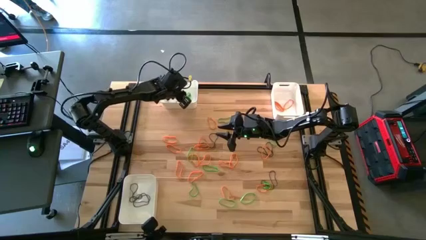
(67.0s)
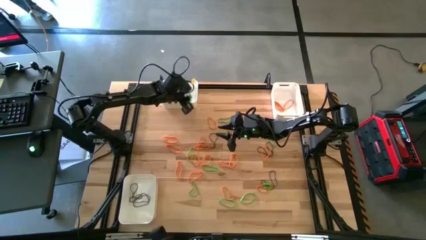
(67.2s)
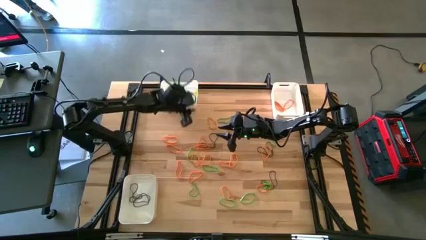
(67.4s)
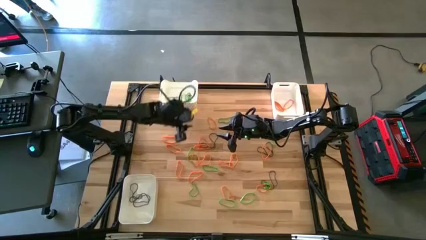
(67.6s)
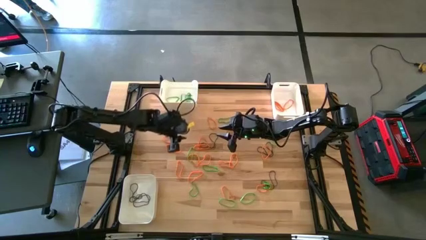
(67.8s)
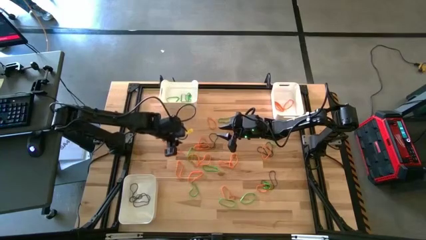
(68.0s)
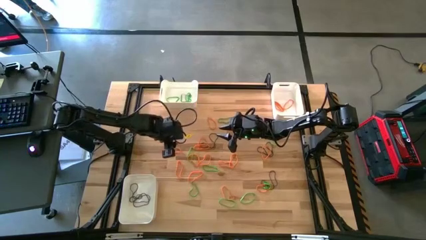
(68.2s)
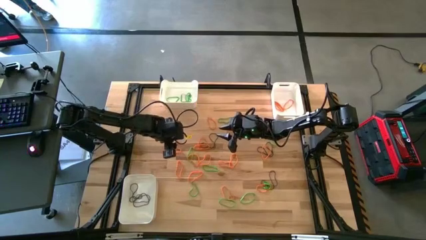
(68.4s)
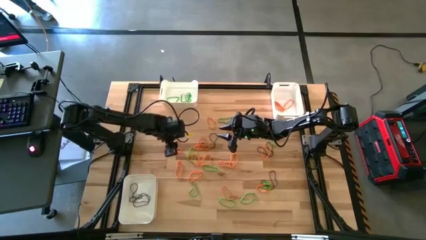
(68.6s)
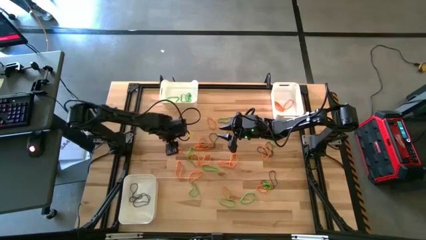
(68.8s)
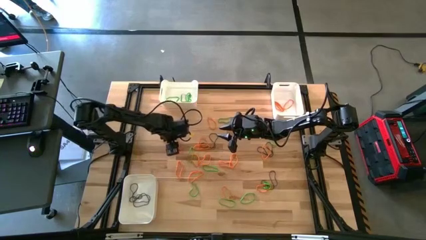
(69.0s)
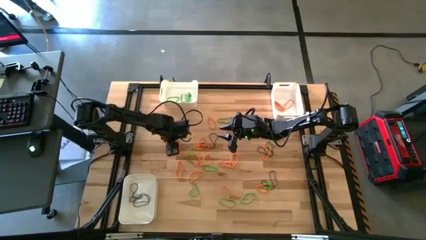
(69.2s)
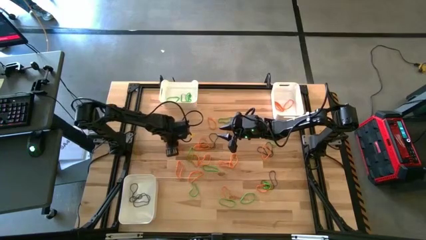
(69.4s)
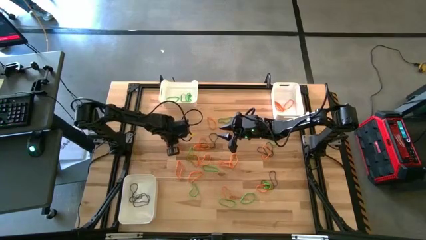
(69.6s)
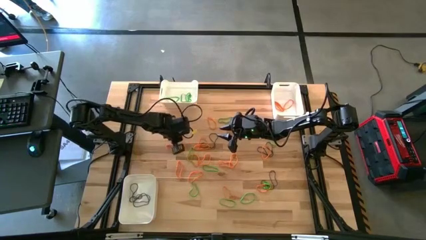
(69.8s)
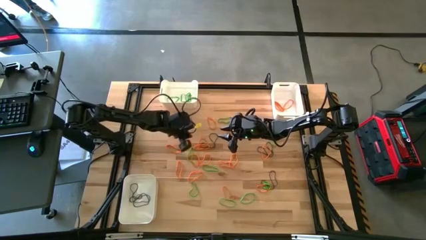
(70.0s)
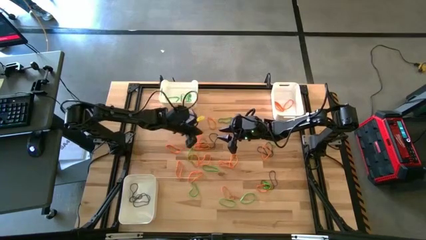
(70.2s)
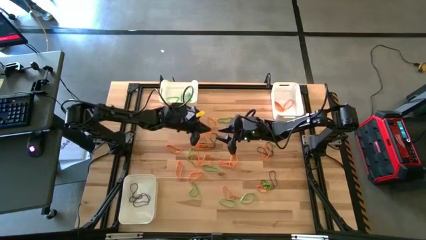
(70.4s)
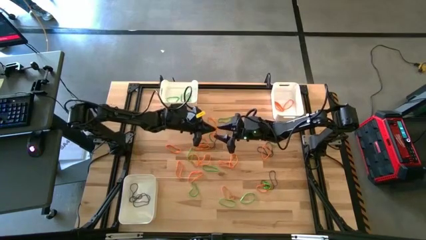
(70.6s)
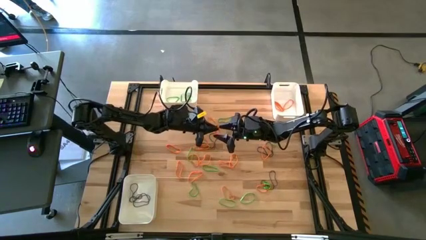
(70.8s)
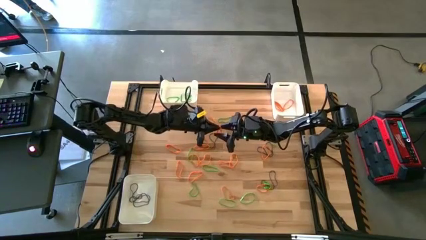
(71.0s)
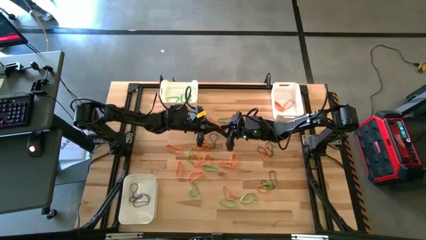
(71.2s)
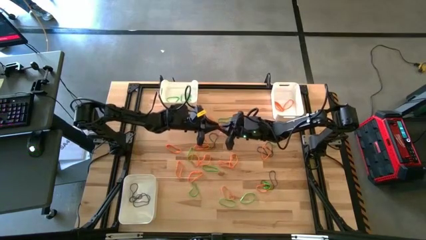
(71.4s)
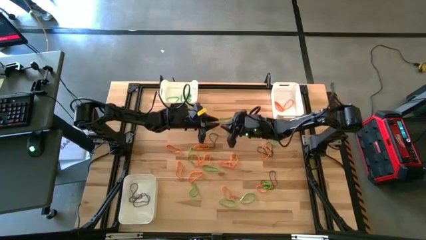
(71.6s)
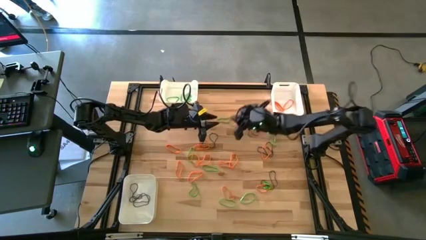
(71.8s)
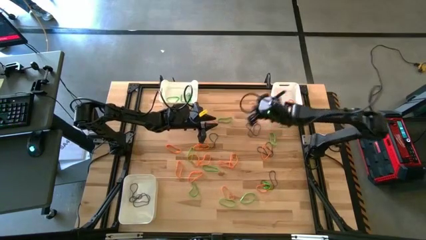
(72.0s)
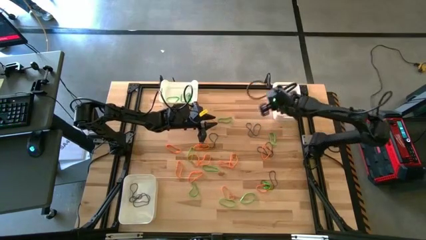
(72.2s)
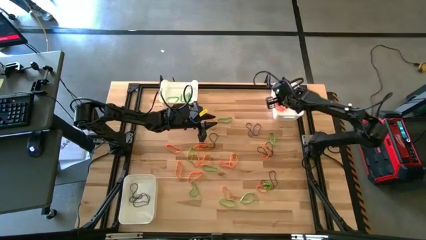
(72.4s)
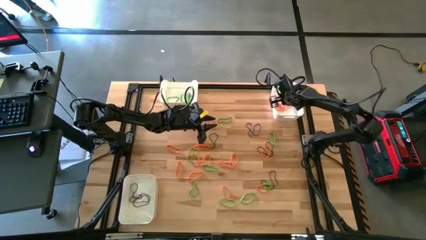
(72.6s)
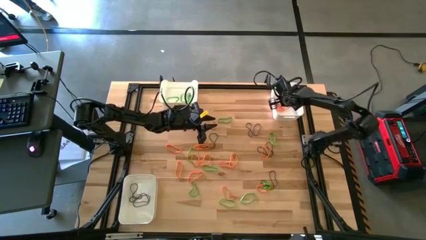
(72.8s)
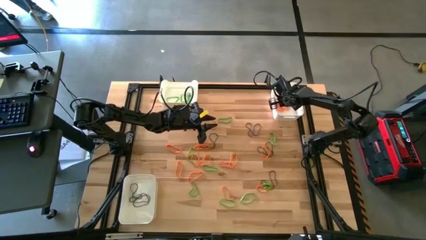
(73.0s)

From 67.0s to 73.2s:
Task: Sort rubber bands into baskets
Put the orange rubber band into the top right white bin

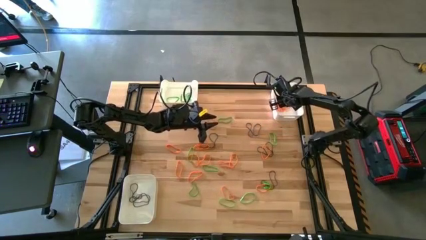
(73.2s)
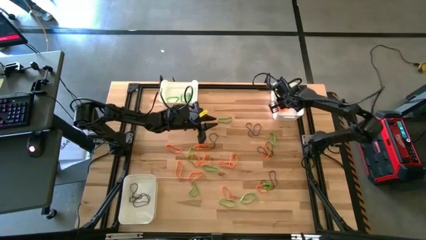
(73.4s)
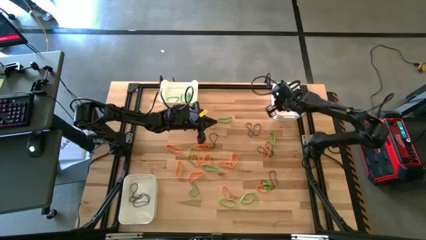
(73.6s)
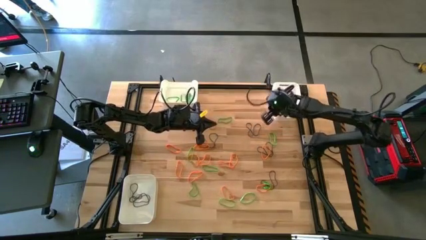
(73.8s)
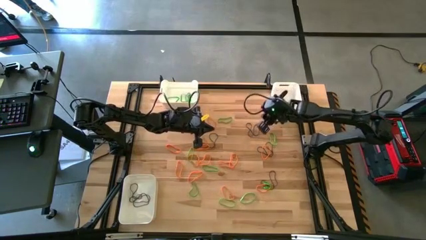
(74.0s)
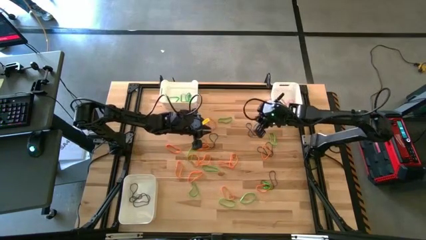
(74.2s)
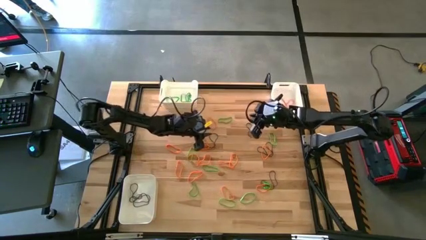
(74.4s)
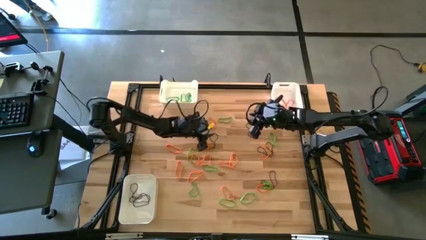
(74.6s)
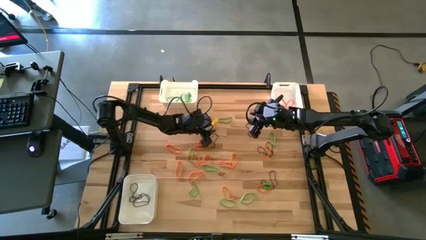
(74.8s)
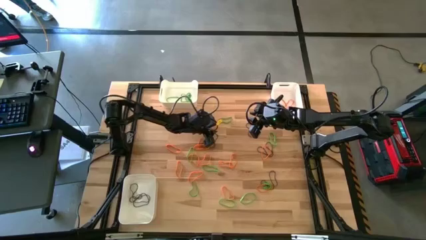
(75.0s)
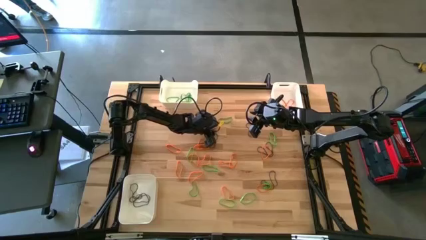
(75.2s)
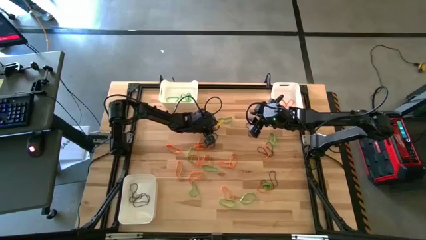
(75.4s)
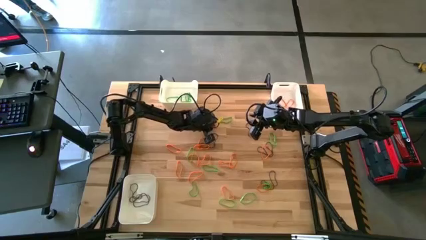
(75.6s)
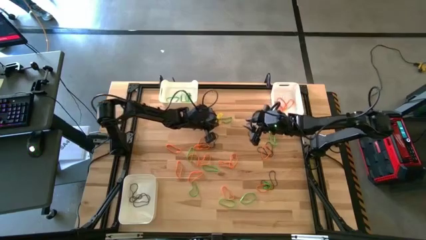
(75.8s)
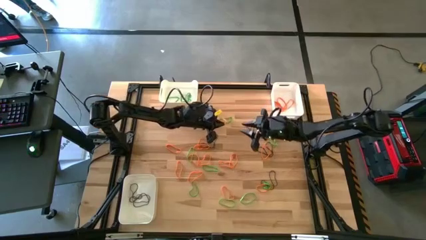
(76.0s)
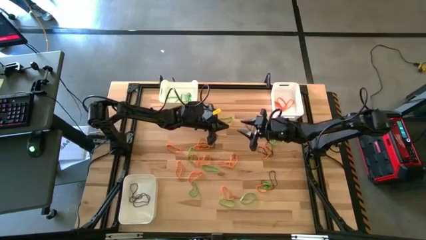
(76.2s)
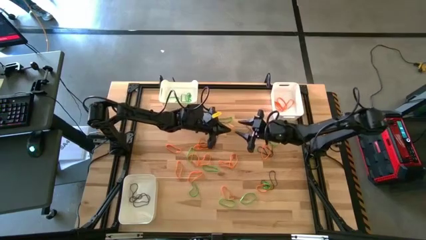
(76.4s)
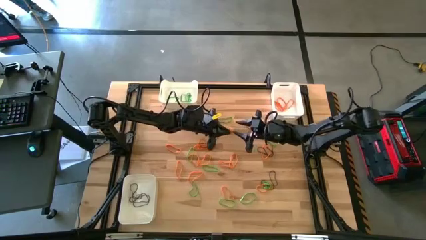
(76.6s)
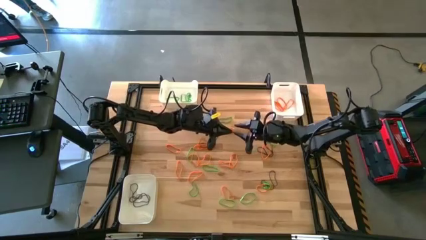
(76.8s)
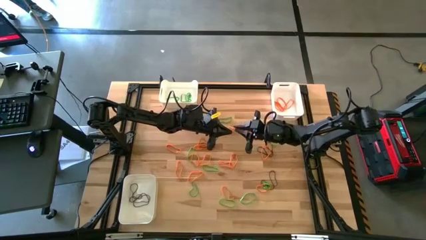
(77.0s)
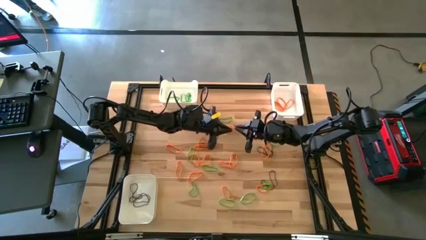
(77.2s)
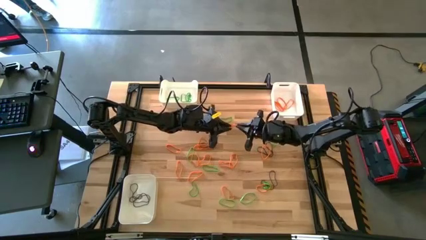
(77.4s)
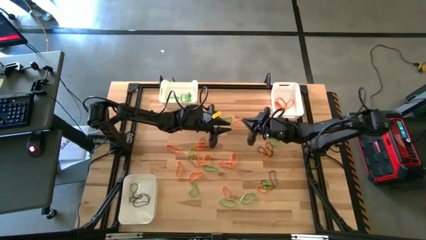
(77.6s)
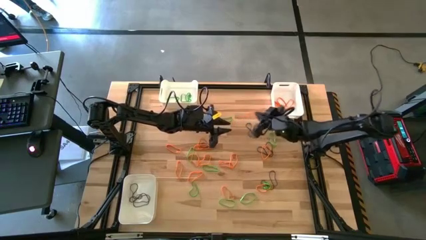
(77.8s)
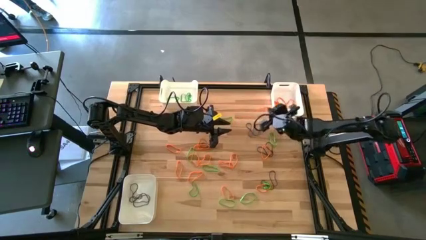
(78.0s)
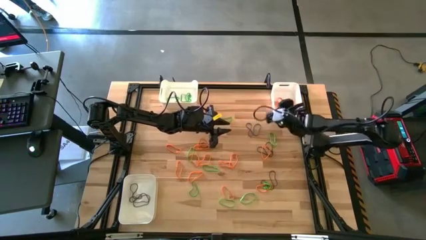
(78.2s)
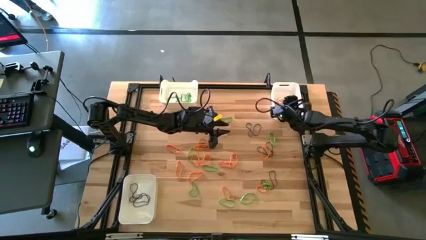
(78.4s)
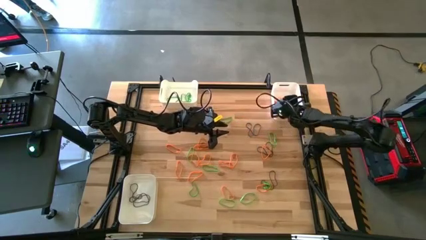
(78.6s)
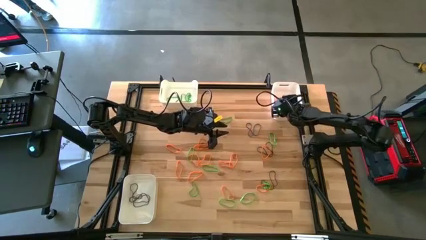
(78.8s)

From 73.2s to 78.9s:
Put the orange rubber band into the top right white bin

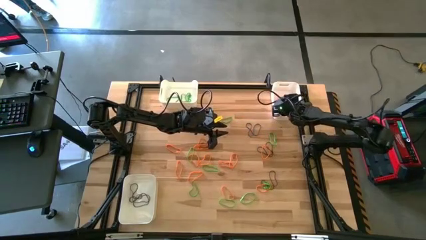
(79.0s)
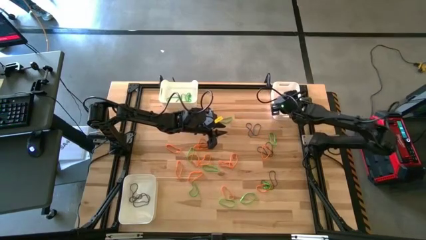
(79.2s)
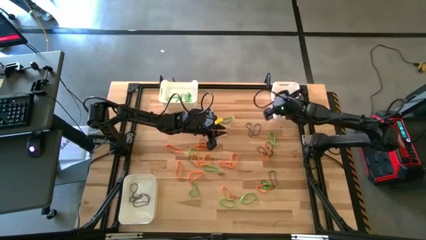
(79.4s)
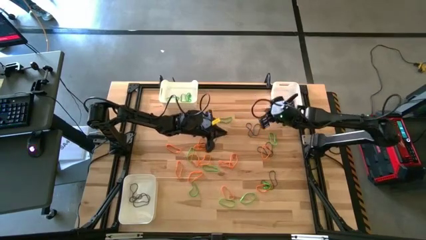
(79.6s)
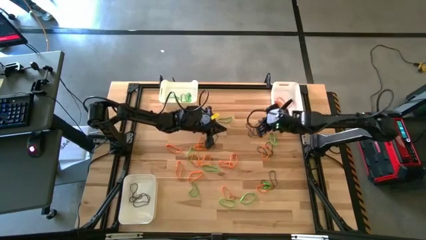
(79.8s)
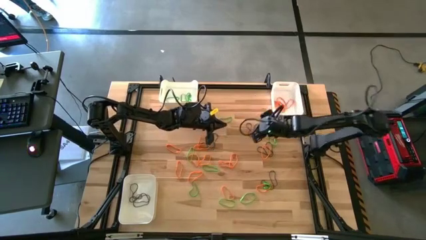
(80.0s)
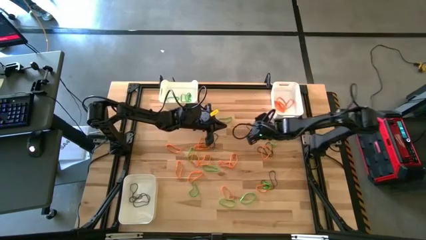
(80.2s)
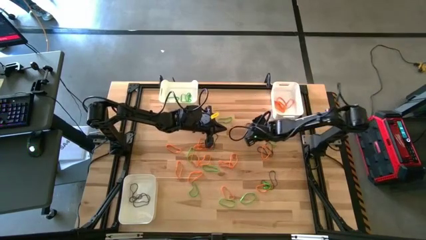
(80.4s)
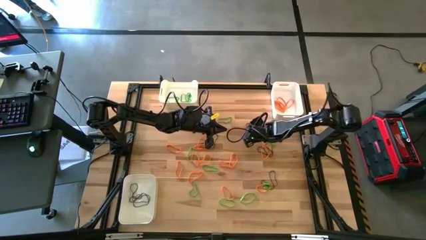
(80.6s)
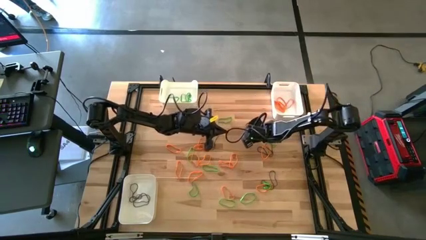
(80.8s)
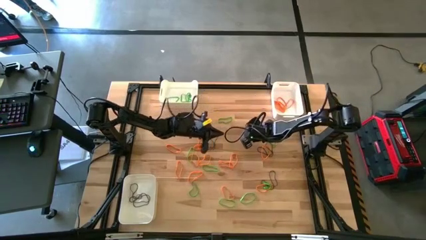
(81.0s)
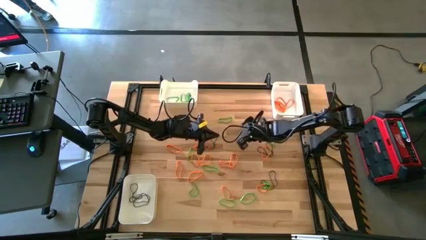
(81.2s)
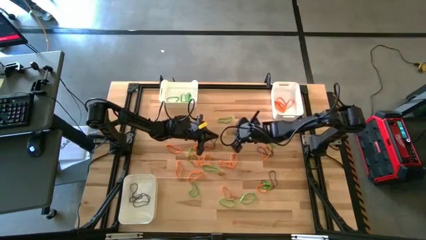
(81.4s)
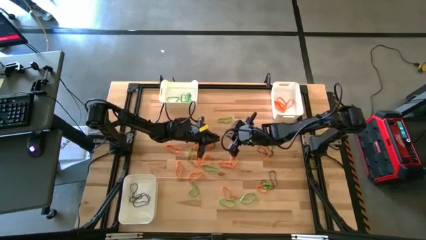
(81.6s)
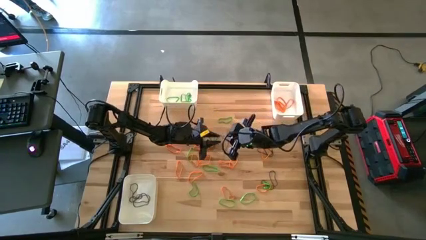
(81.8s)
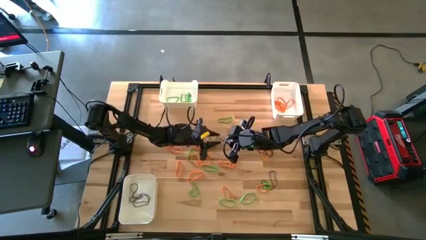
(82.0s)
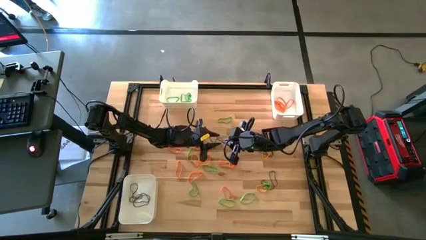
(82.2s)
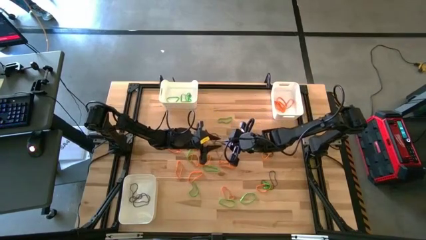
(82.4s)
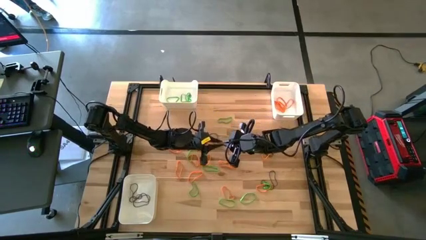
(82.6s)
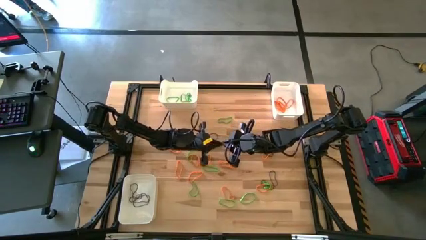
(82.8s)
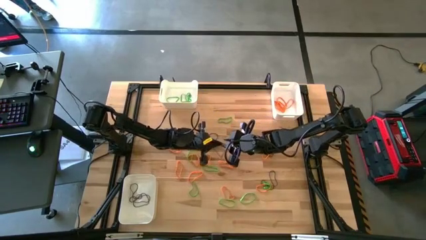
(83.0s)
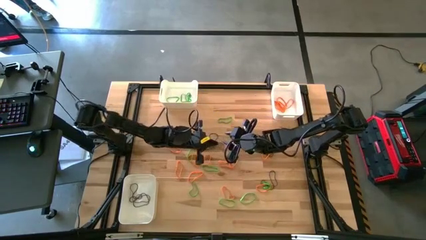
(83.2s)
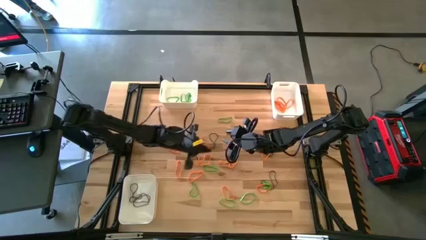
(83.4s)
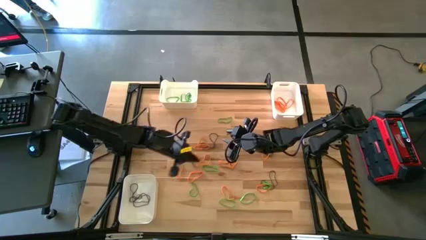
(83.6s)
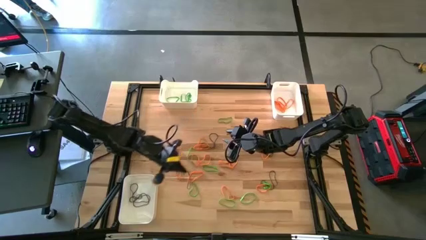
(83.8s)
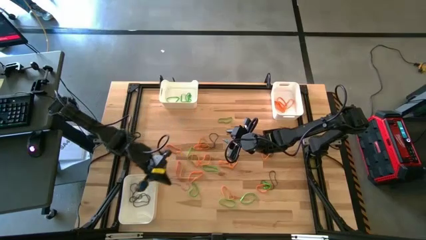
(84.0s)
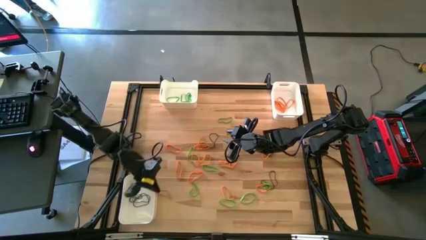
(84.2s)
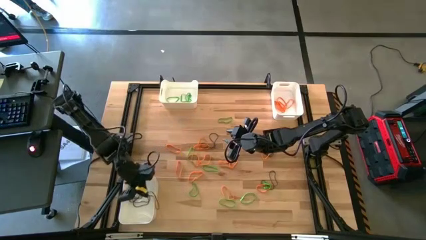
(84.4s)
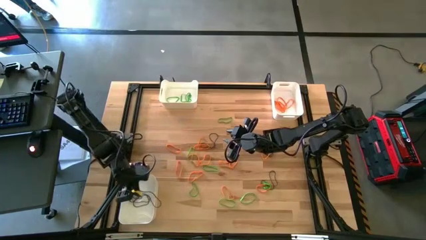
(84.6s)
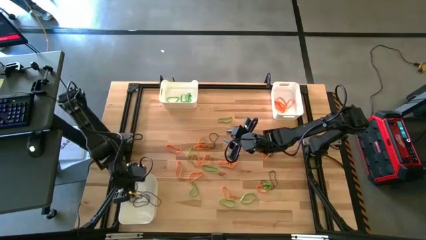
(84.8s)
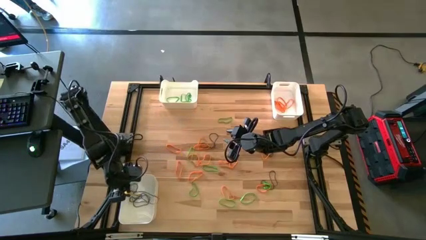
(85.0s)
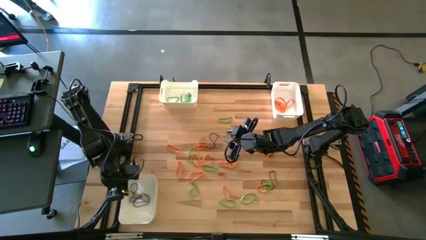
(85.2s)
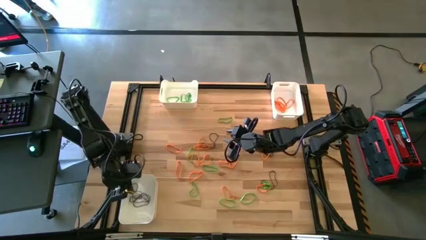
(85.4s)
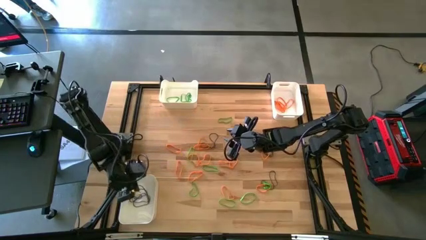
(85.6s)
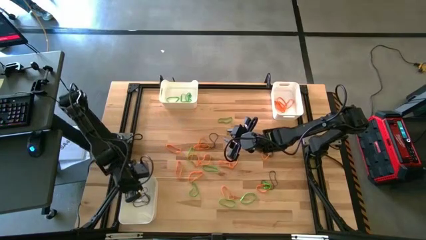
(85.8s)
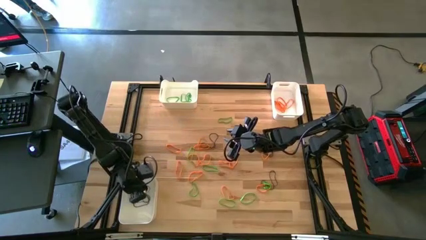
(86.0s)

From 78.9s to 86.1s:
Put the purple rubber band into the bottom left white bin
